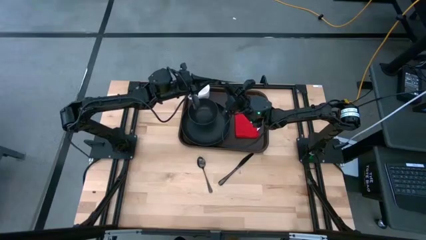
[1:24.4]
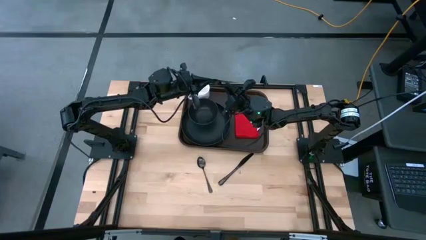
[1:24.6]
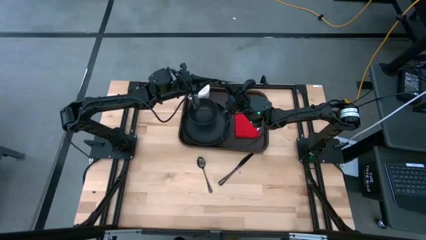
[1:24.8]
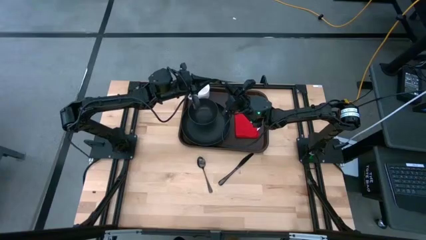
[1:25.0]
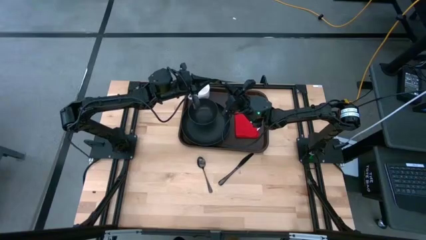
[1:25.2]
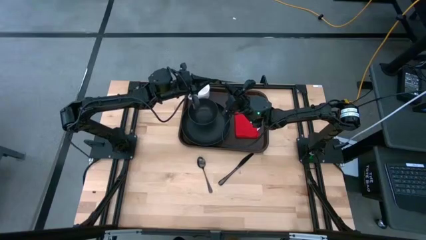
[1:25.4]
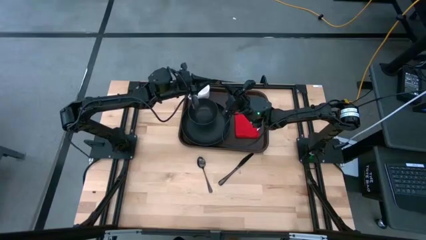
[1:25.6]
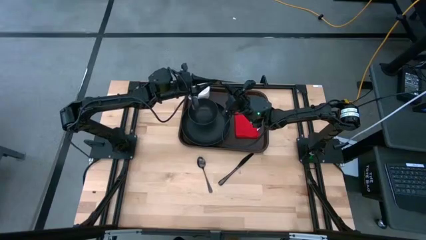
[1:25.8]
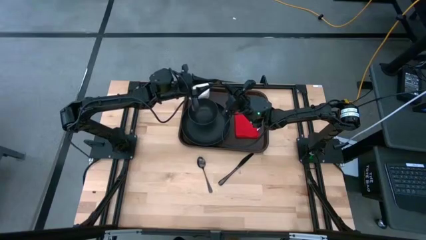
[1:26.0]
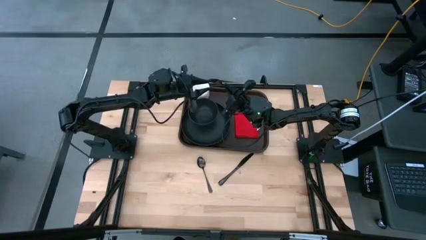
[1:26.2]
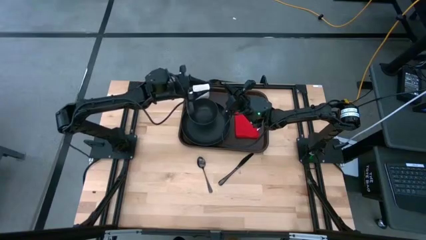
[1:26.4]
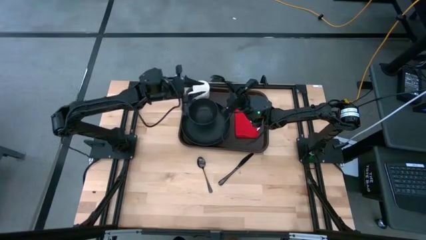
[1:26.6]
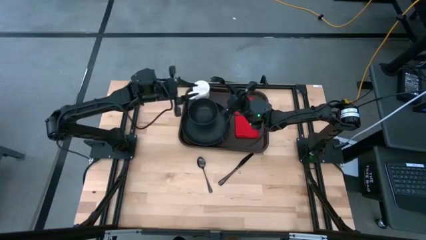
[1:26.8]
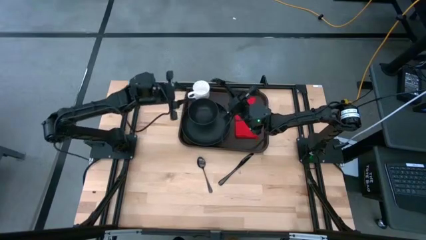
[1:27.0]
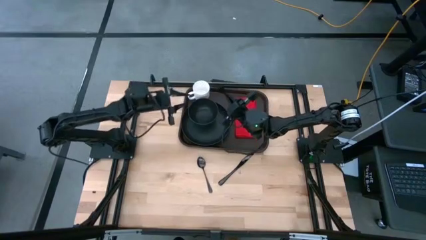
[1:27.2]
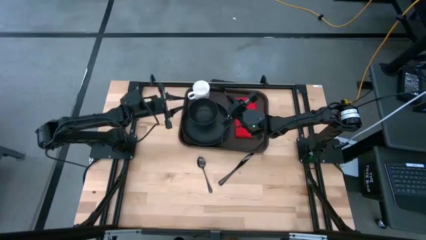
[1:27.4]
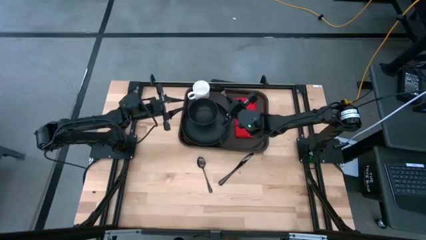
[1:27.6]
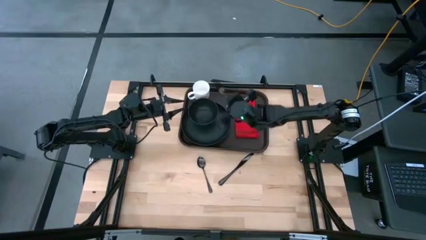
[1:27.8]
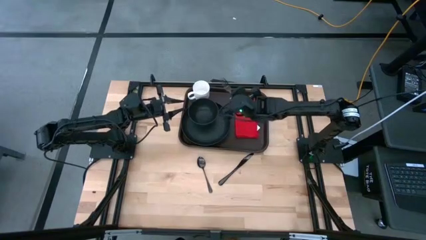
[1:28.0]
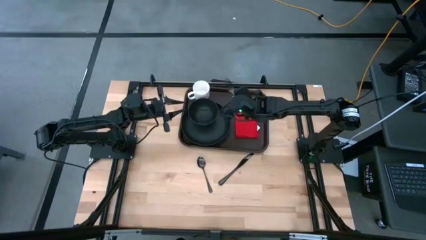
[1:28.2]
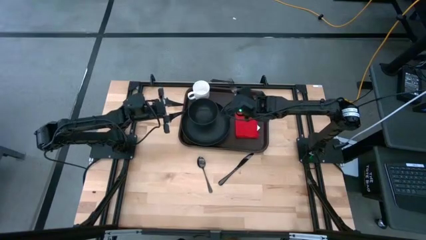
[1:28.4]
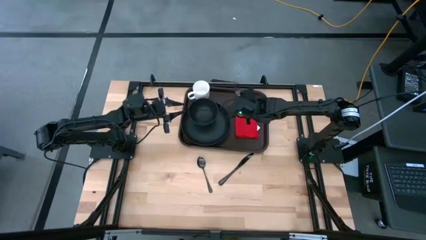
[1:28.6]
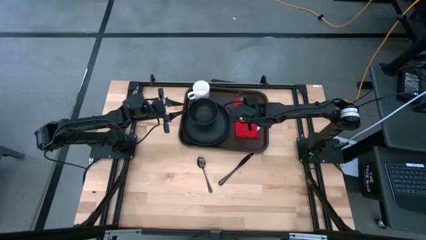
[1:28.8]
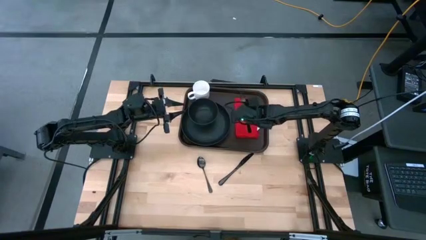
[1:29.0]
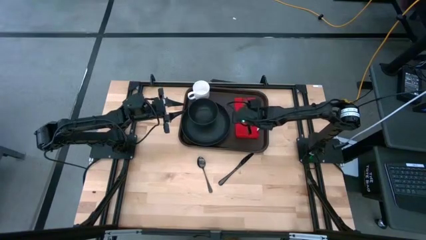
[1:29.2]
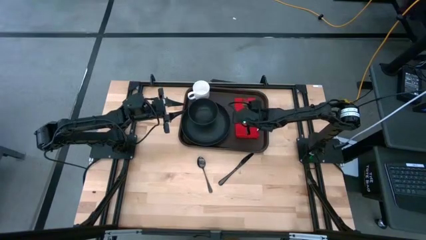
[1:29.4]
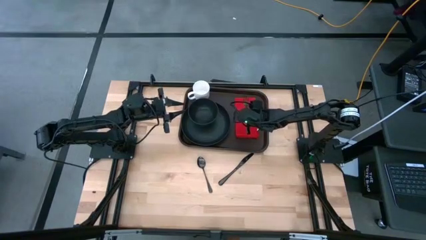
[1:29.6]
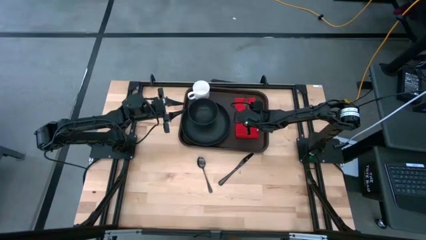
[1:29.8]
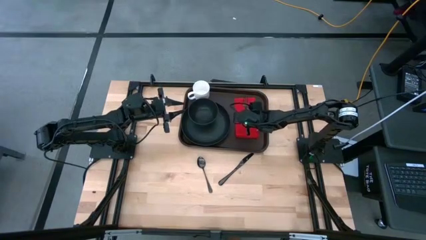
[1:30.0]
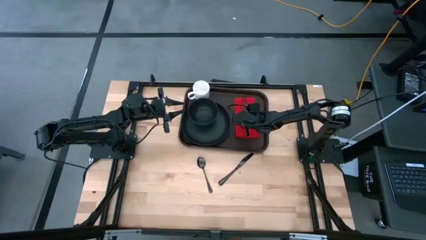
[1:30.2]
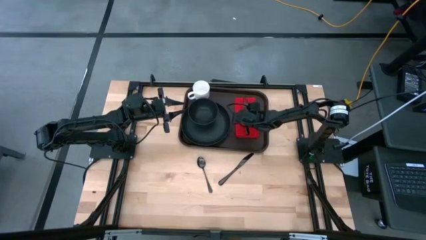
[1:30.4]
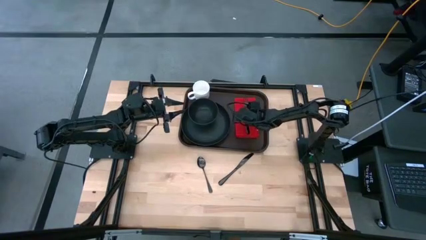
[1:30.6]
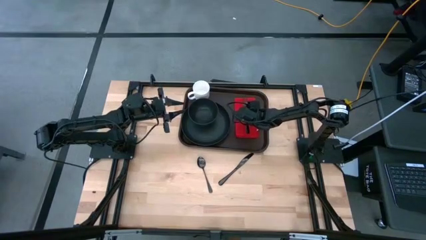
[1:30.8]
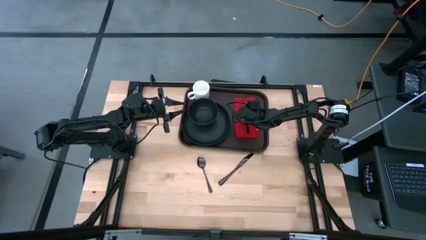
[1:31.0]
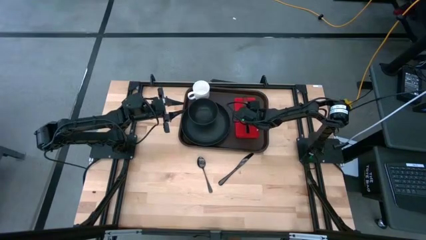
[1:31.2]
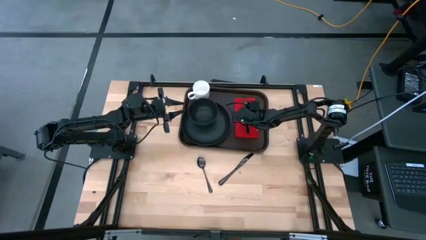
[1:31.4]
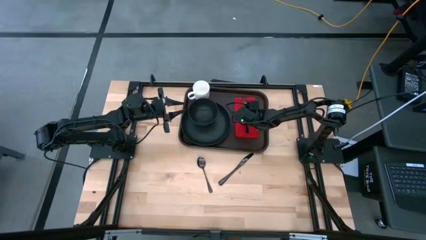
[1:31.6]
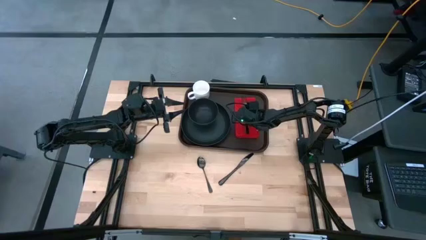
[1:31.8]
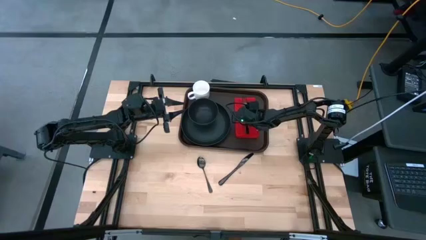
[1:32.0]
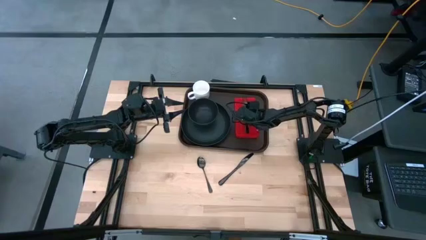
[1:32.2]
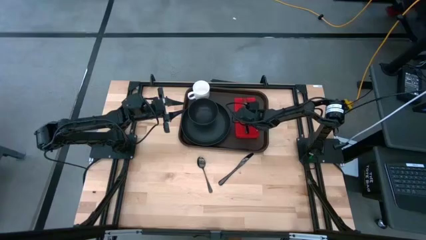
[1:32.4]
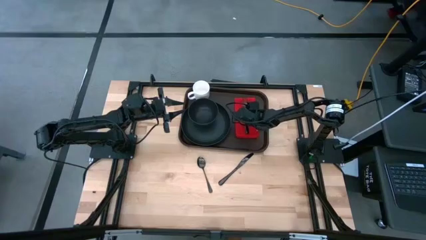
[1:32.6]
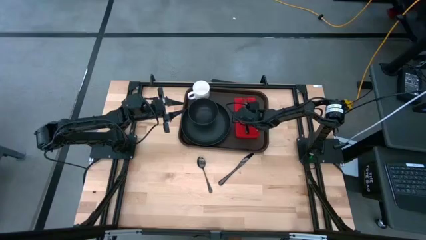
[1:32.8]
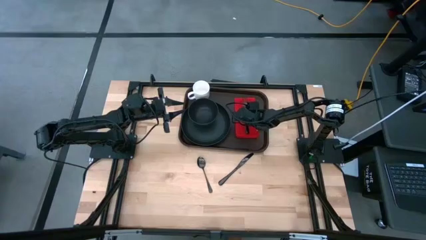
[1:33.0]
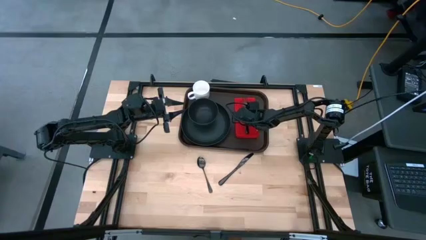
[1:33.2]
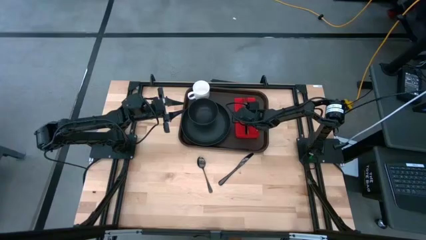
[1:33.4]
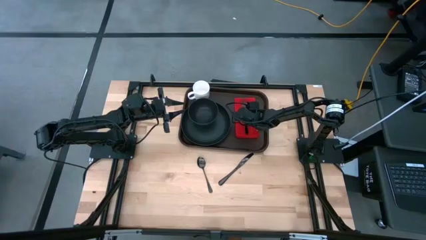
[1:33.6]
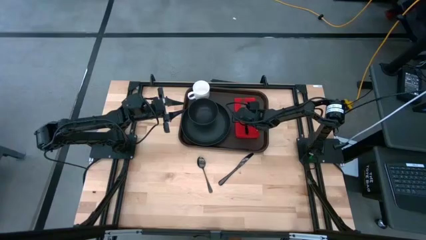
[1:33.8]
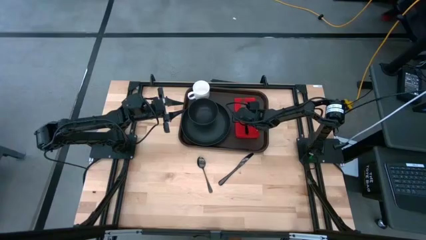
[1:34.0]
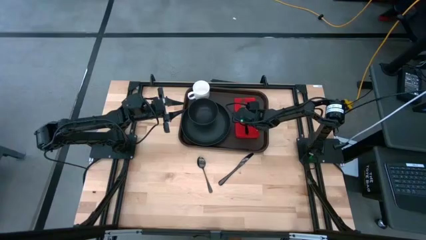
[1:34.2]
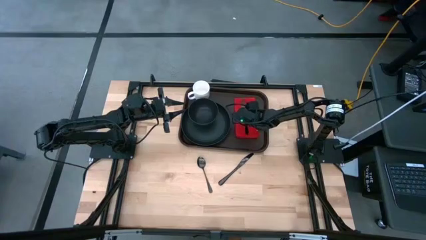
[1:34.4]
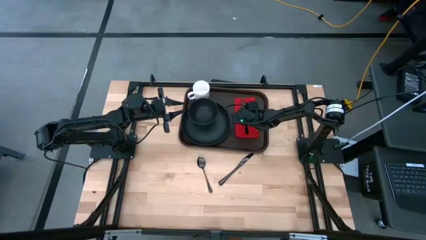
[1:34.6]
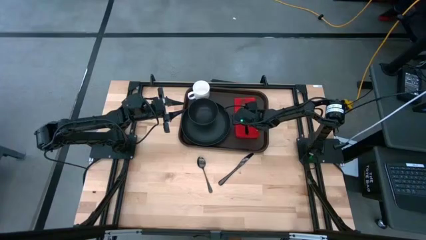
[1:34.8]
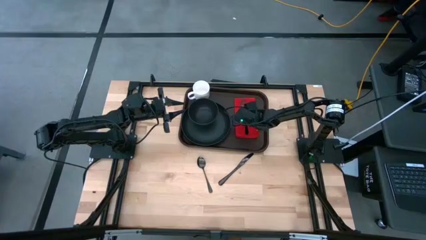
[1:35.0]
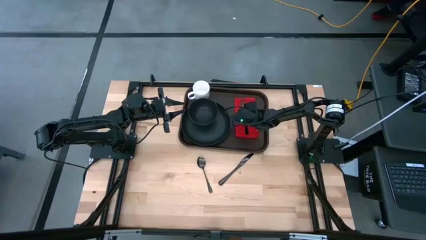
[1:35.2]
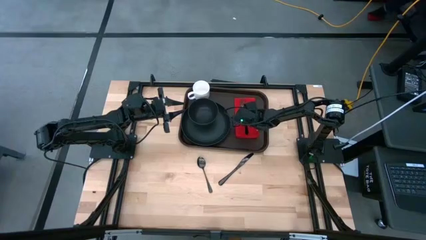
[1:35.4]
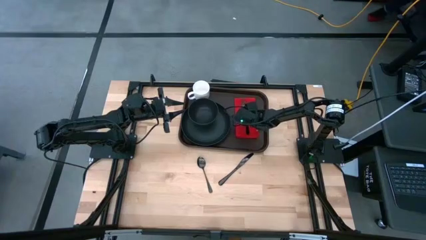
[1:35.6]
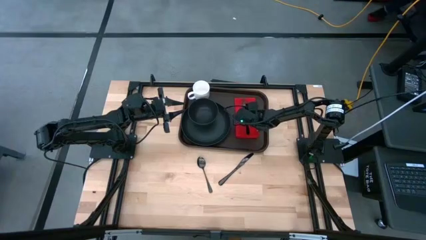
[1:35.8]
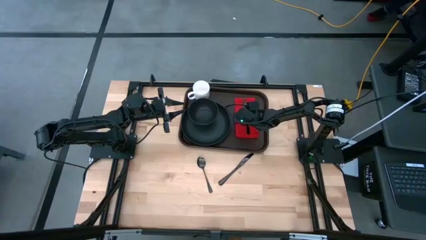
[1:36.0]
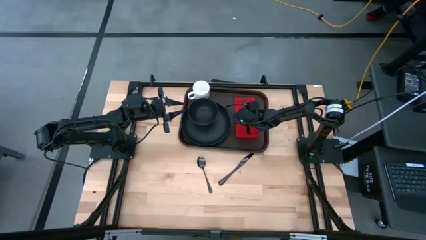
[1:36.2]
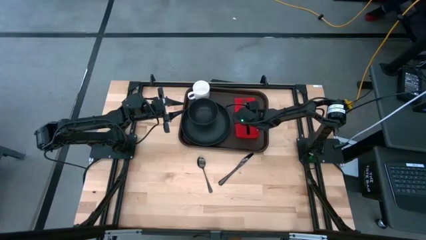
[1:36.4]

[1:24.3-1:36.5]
Task: Set up tray
Put the black fork in the center of the red napkin
